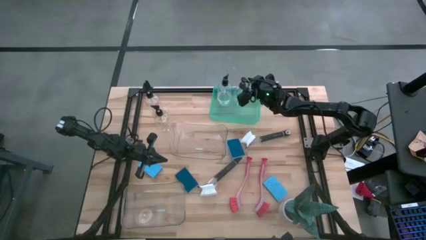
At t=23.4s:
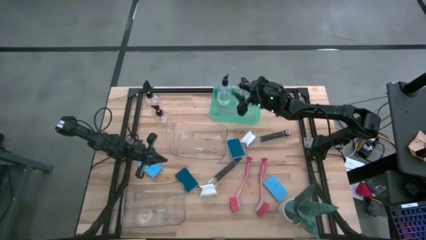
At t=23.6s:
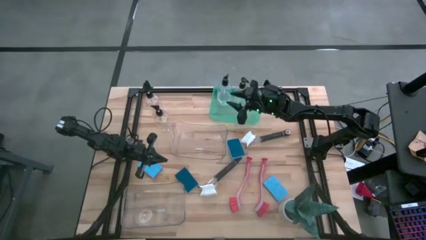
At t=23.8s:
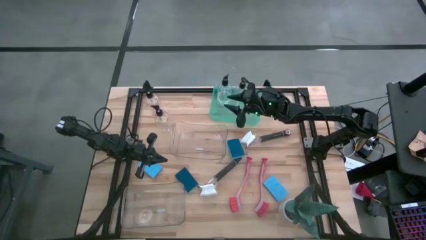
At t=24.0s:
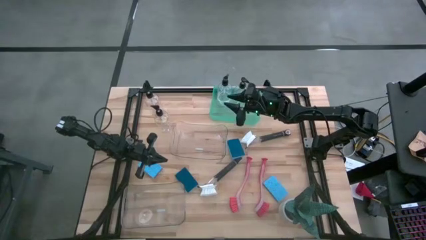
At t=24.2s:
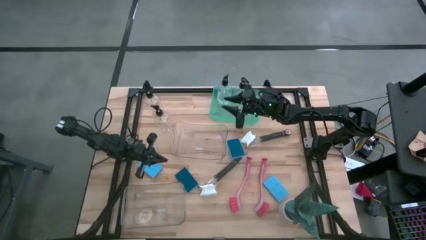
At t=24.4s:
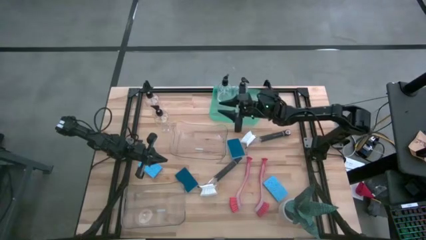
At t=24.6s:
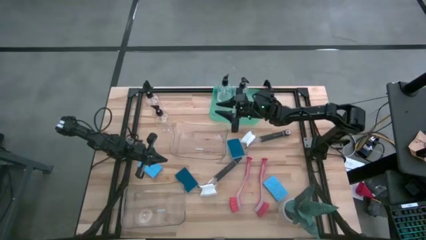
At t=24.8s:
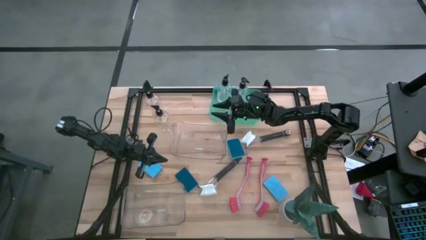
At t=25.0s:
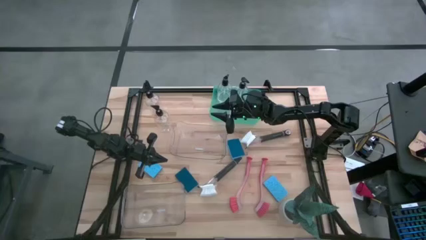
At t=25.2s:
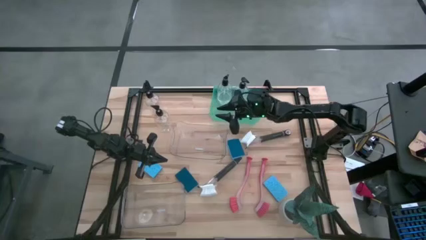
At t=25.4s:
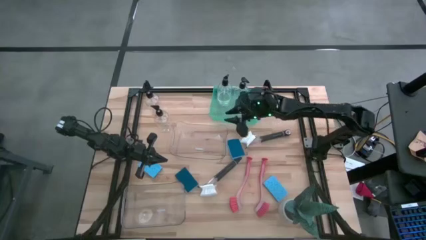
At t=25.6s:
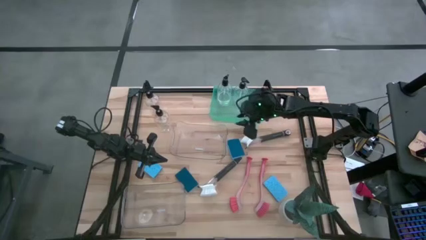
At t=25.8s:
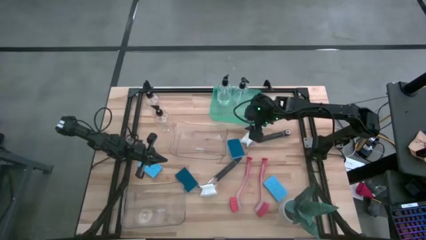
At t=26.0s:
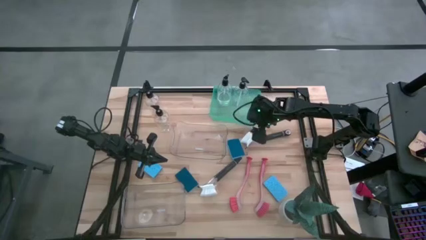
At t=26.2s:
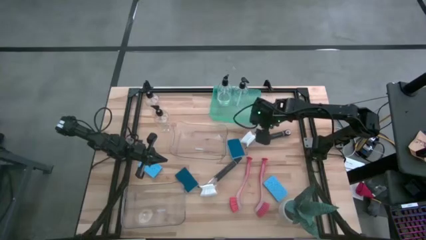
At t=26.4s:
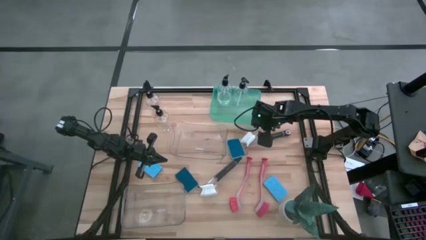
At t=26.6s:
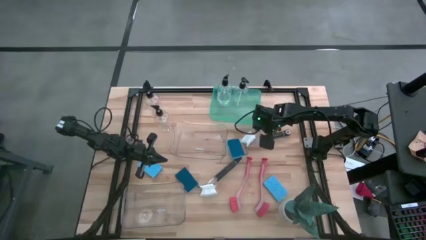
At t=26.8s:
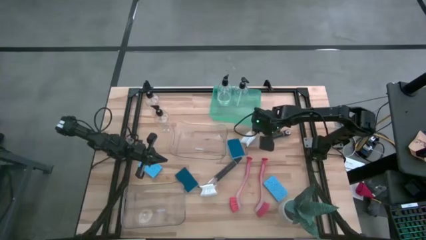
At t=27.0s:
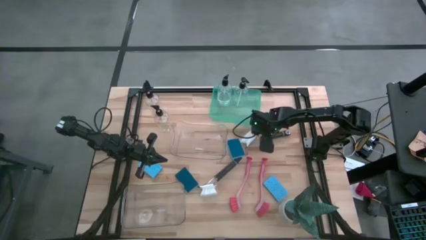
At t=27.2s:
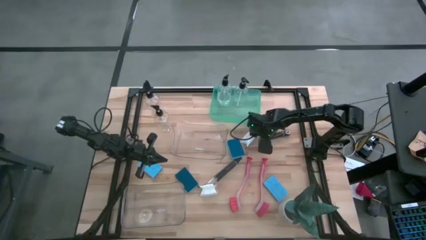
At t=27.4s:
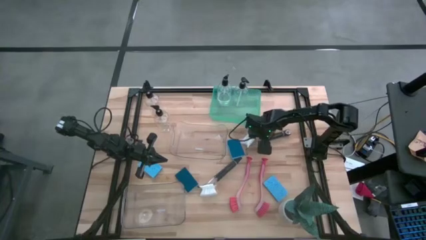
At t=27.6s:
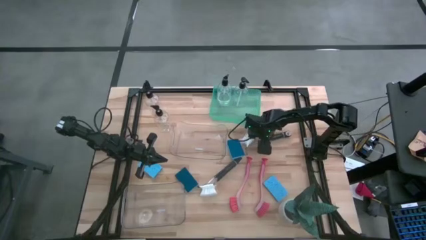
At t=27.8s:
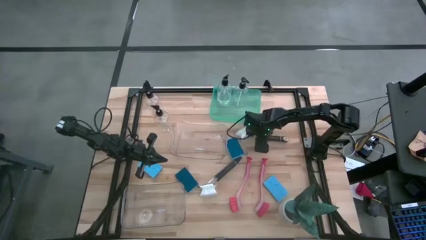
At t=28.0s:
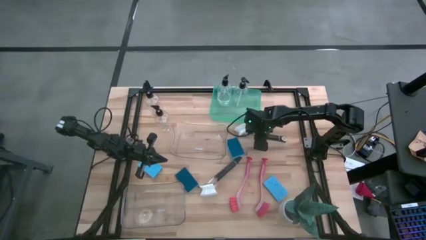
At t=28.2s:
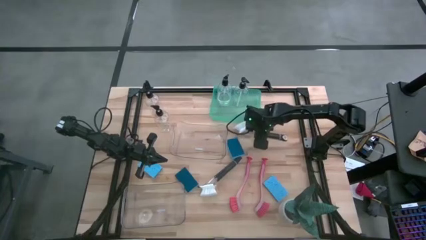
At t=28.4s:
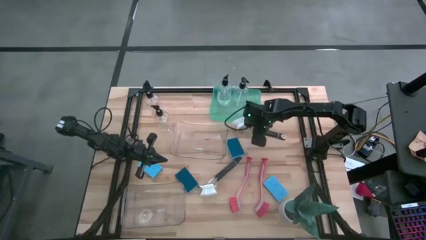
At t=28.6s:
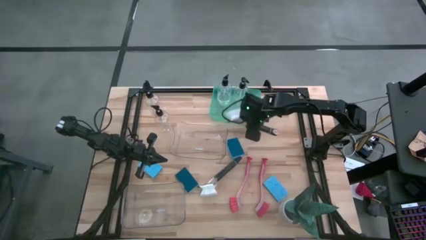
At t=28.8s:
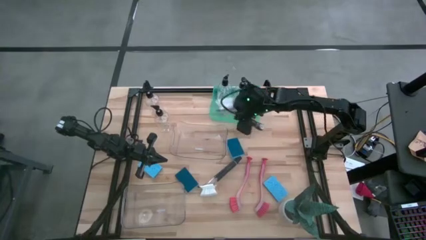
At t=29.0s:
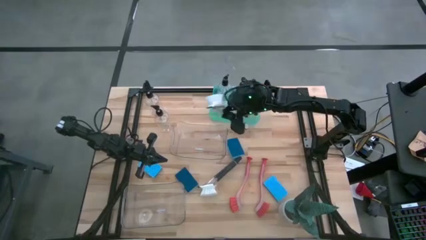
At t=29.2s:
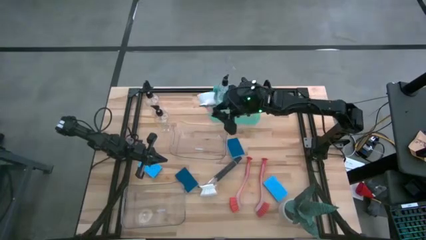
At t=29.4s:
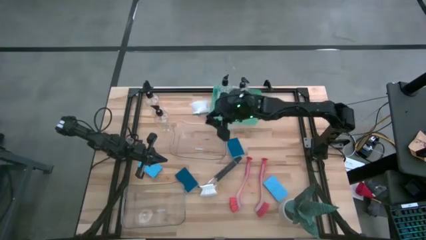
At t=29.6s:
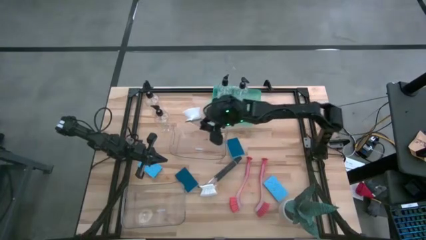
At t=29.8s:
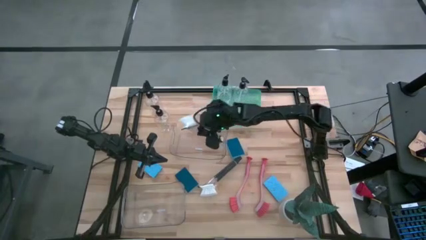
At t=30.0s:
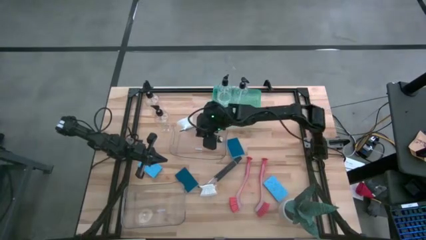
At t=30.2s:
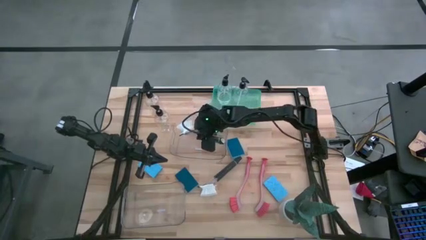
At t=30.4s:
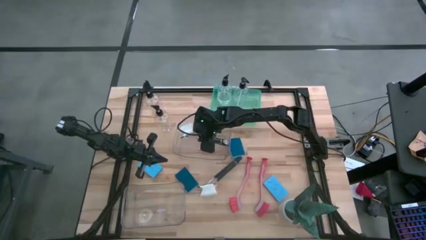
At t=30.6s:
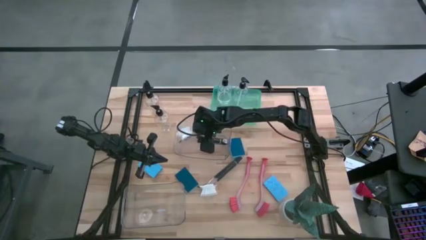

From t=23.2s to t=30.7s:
Task: Pick & Place Kitchen Sink Supplies
Put the black dish brush into the top transparent bin

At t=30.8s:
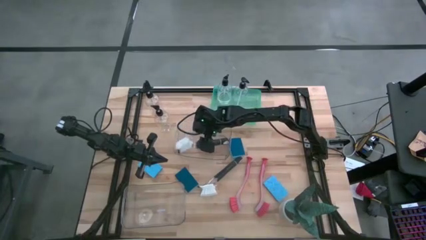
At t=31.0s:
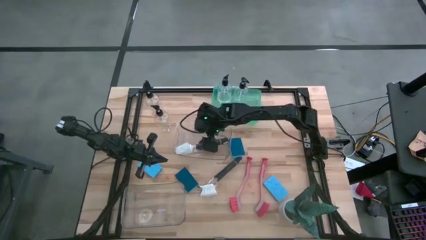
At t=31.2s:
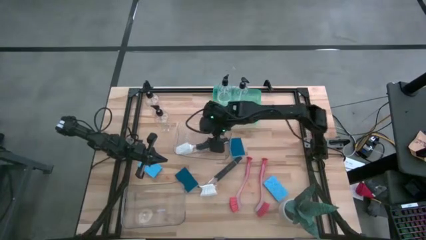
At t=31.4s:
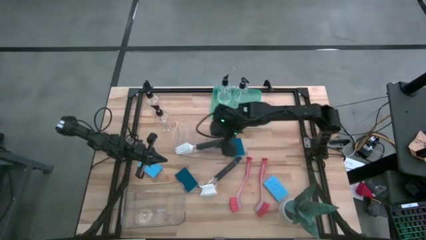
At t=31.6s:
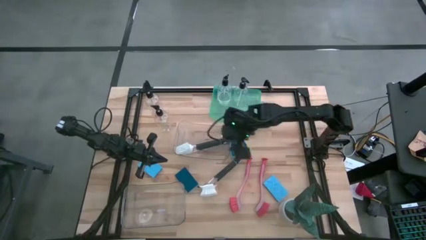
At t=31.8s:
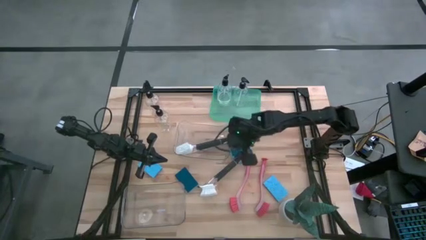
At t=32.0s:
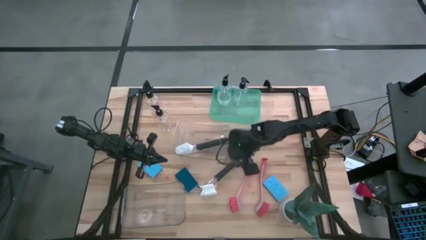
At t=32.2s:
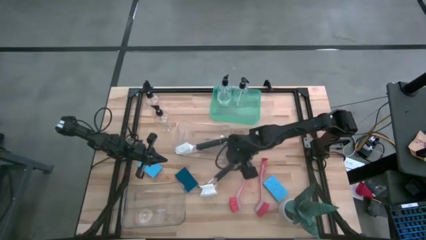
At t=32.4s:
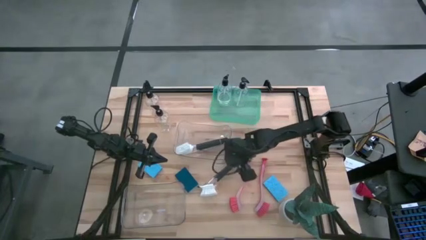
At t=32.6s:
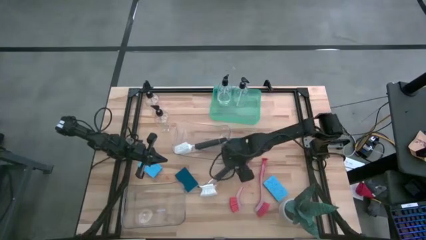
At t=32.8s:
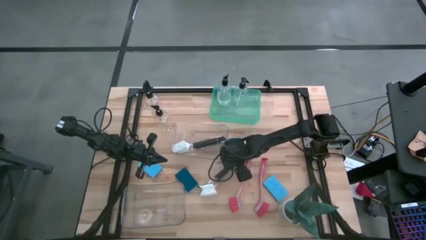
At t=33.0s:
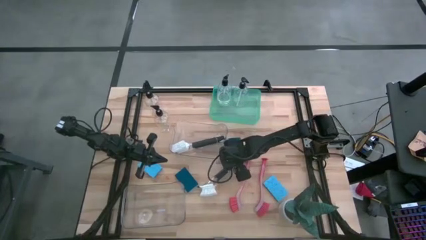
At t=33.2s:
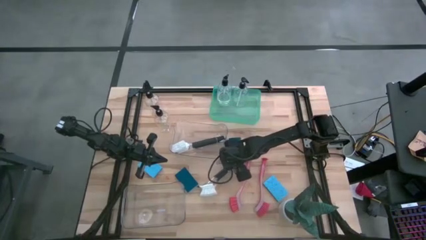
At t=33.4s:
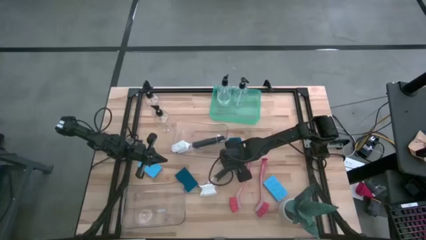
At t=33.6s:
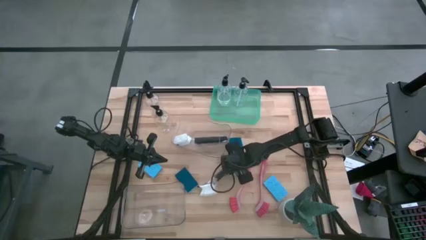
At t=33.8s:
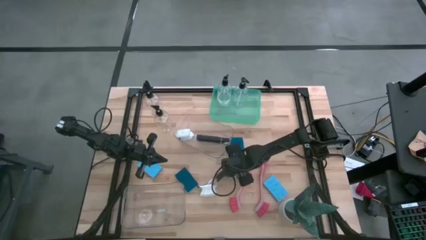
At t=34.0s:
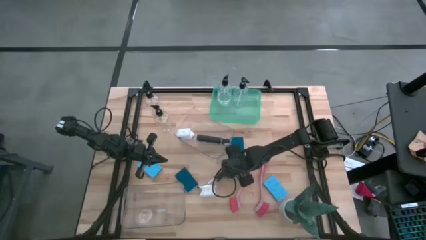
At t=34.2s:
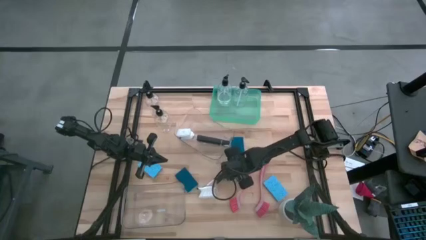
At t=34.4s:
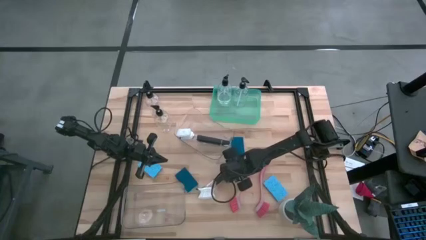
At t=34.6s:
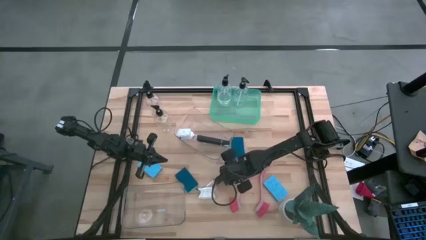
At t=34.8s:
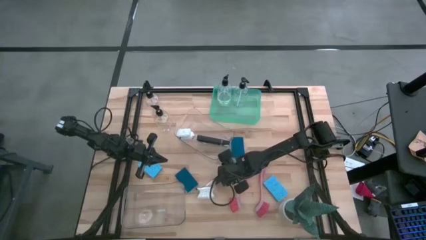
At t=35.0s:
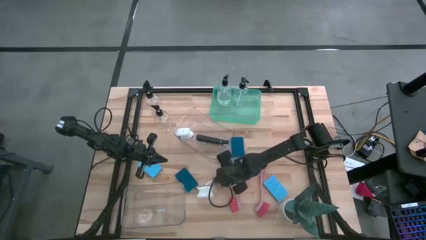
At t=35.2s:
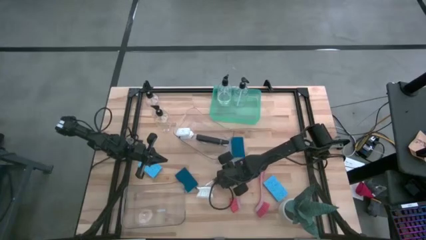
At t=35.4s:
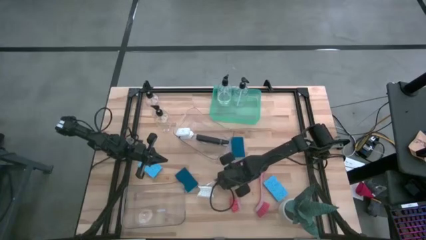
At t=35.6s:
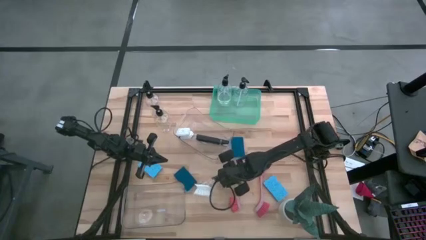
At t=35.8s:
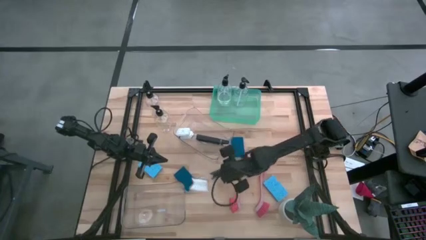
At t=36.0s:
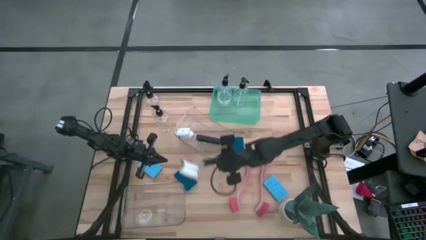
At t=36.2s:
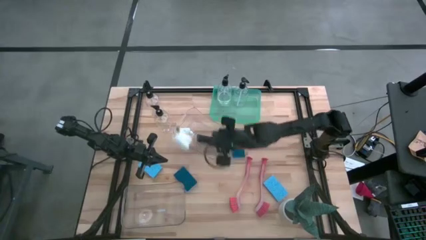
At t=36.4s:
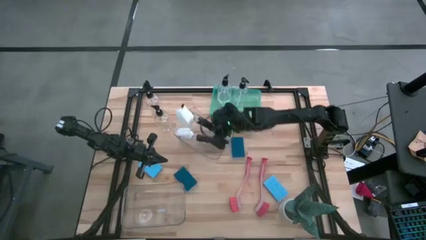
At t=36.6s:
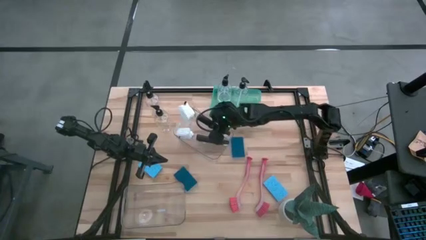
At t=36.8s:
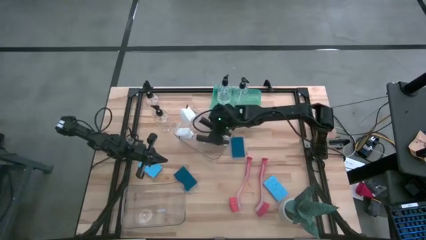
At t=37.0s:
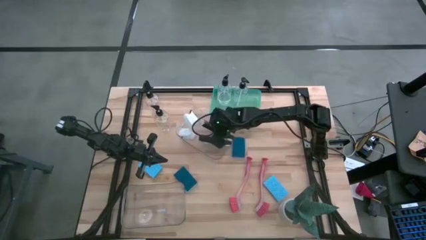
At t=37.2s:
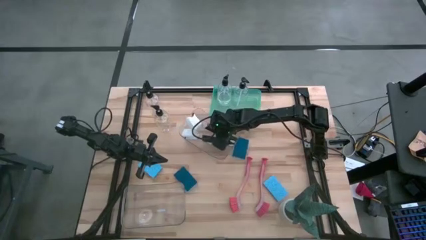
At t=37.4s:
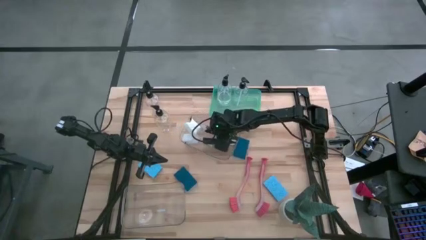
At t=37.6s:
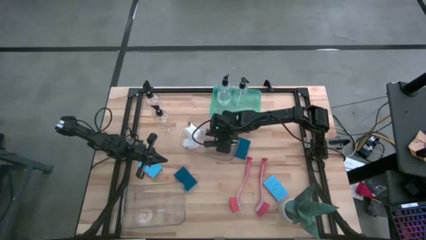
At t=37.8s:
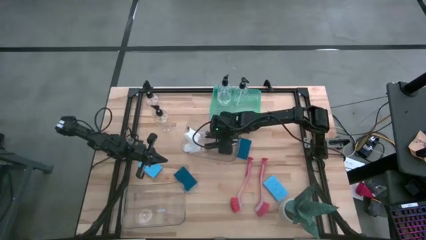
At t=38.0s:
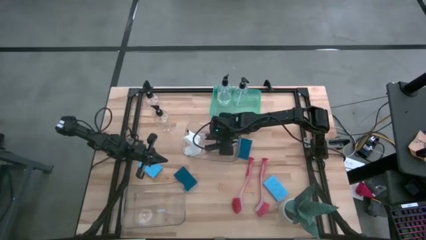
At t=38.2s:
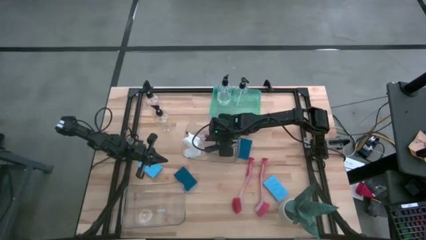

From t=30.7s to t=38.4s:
Put the black dish brush into the top transparent bin

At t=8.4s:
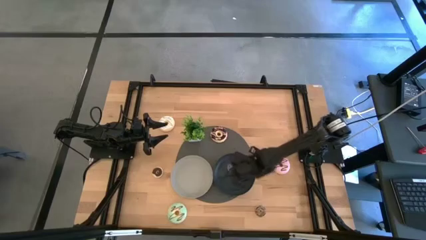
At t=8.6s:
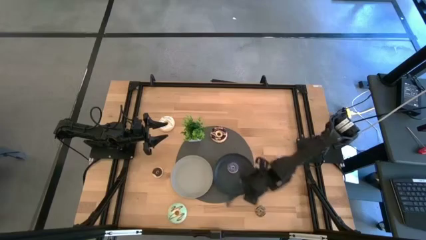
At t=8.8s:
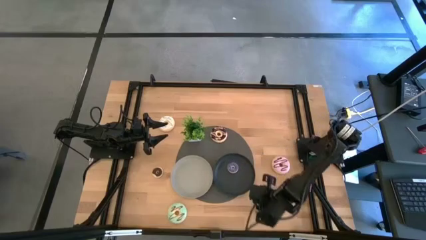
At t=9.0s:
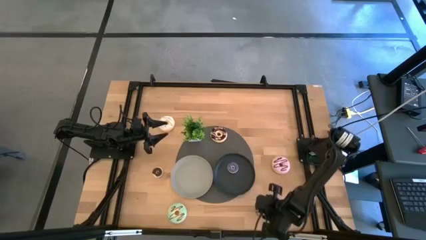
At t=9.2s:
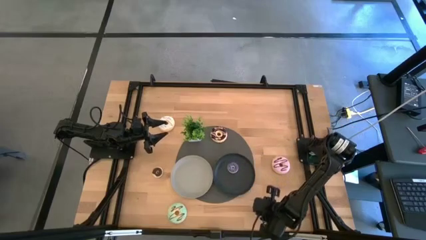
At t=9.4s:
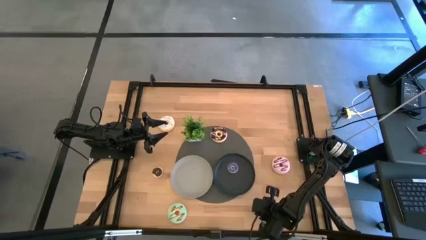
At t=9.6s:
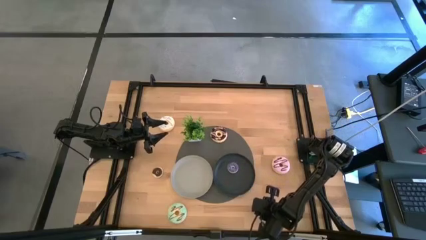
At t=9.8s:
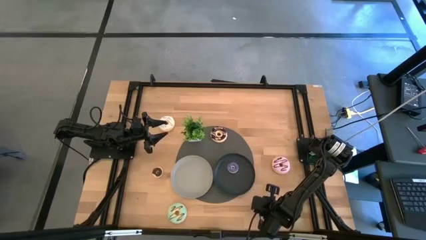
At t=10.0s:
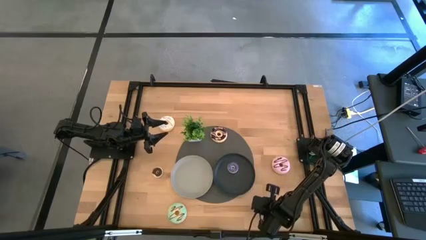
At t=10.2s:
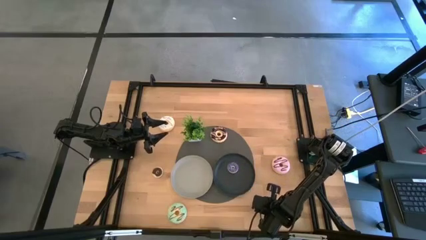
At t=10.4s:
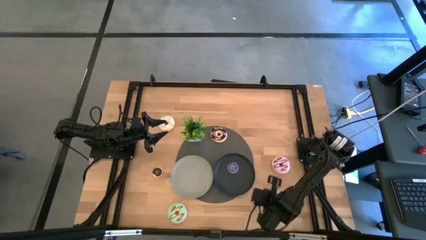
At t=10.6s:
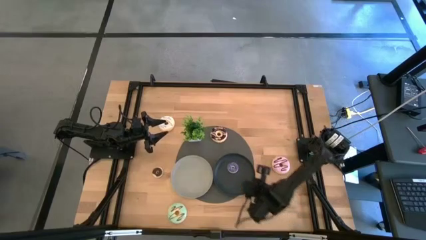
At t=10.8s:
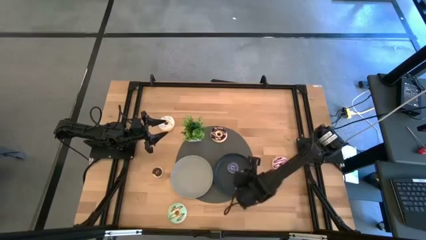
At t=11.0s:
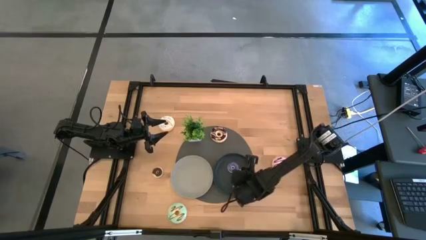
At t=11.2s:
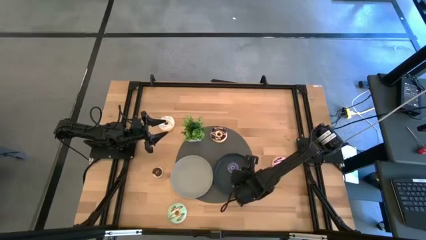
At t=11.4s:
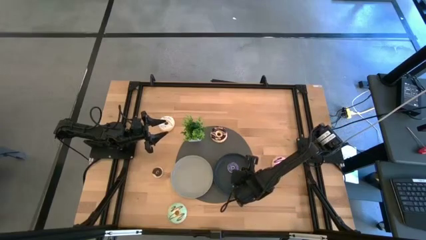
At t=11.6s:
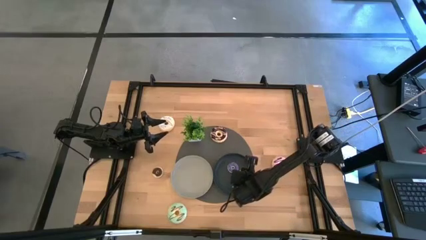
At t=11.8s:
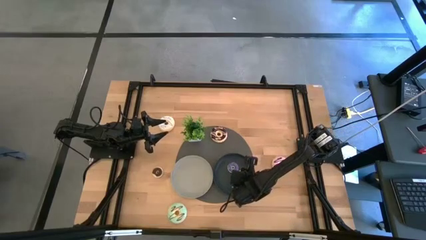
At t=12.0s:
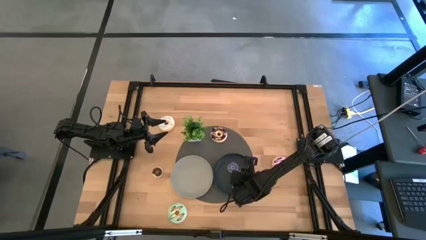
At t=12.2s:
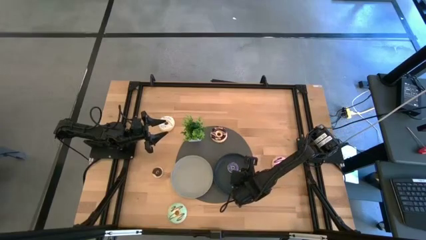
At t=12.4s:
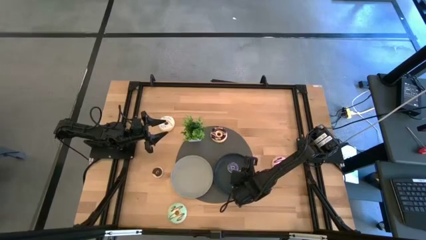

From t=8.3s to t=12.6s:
Task: Pick & Place donuts
Put the small brown donut on the black plate
